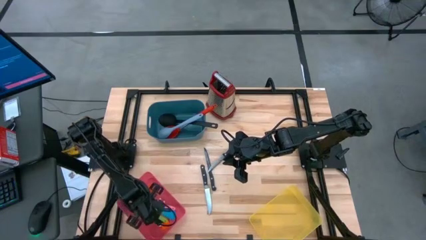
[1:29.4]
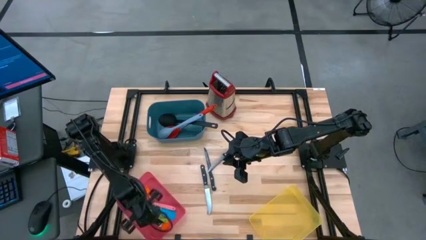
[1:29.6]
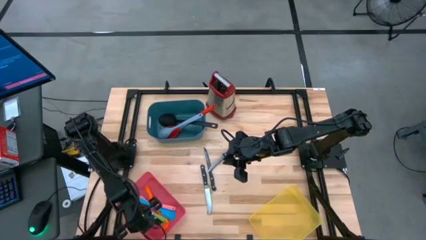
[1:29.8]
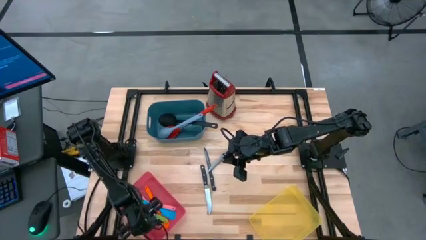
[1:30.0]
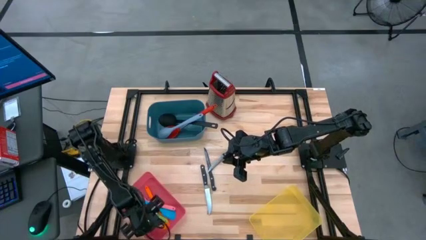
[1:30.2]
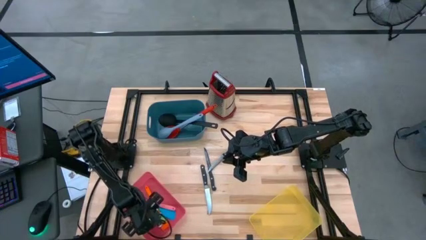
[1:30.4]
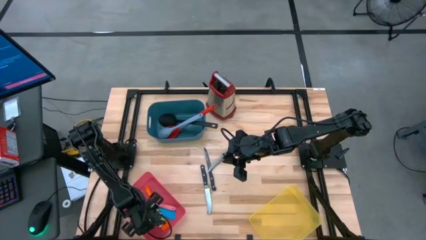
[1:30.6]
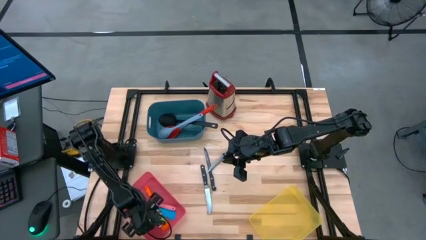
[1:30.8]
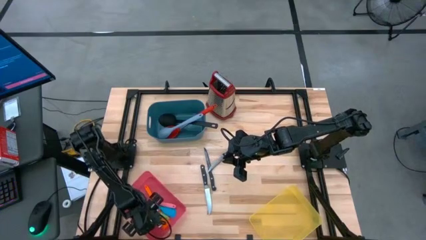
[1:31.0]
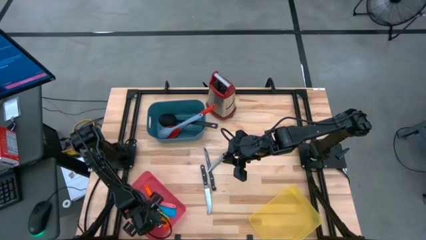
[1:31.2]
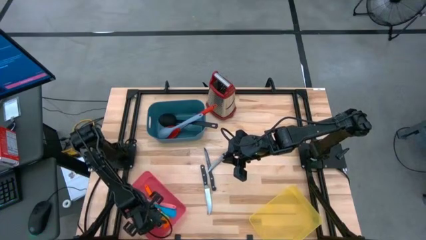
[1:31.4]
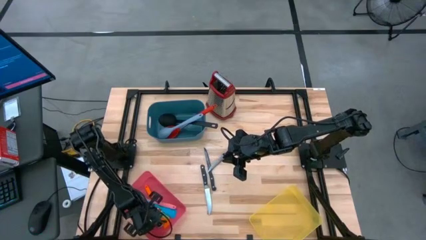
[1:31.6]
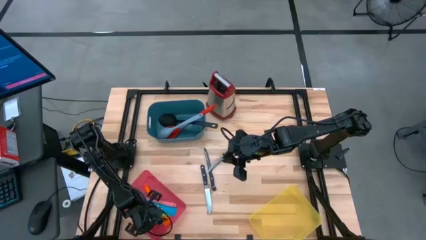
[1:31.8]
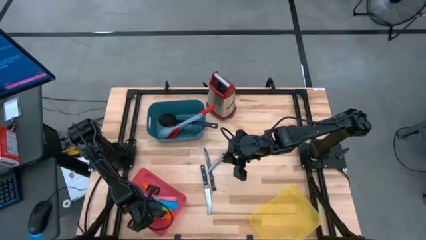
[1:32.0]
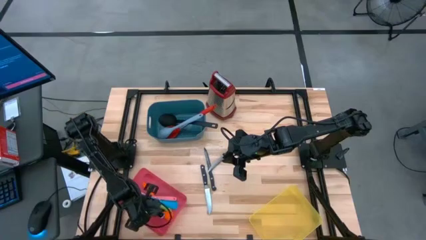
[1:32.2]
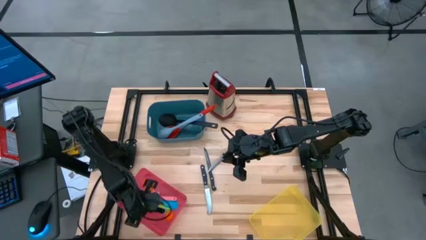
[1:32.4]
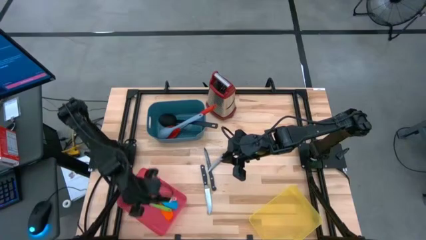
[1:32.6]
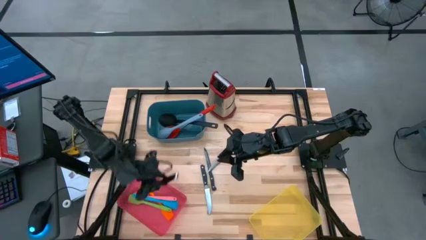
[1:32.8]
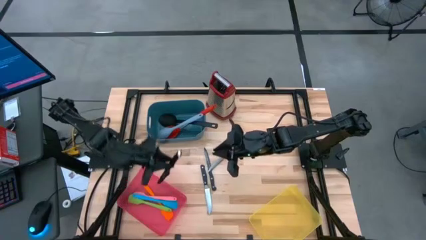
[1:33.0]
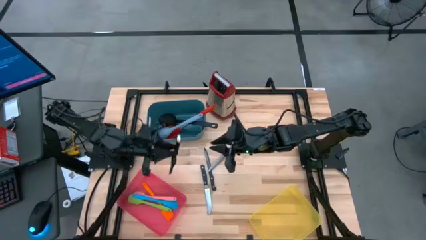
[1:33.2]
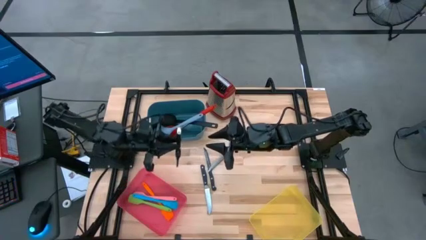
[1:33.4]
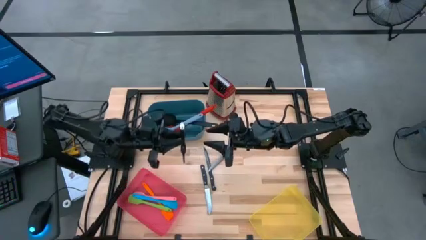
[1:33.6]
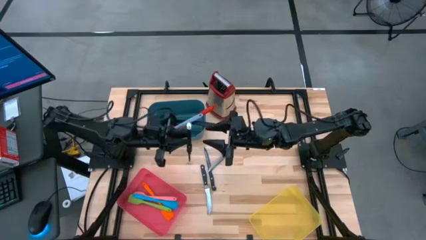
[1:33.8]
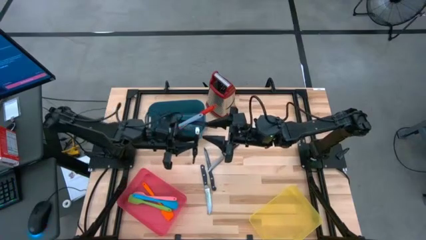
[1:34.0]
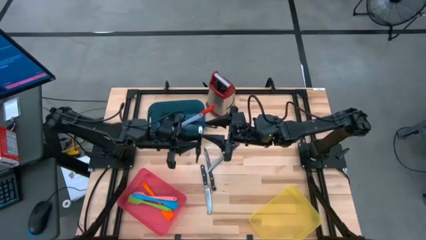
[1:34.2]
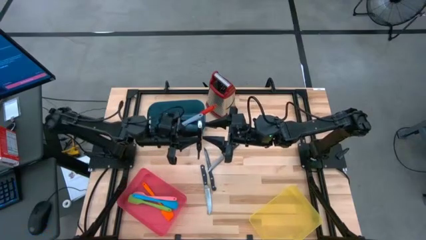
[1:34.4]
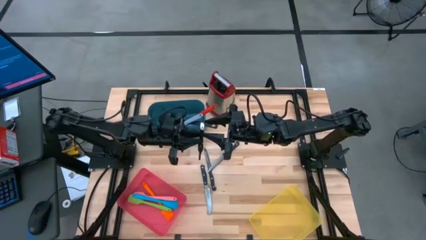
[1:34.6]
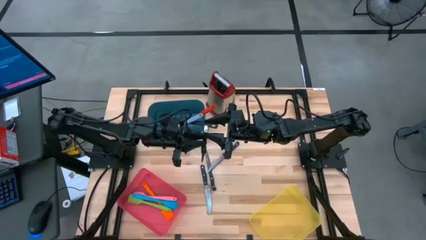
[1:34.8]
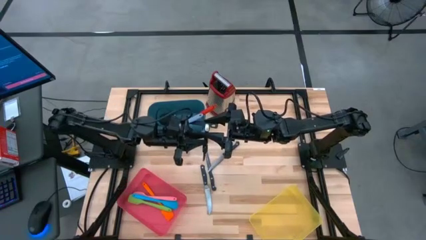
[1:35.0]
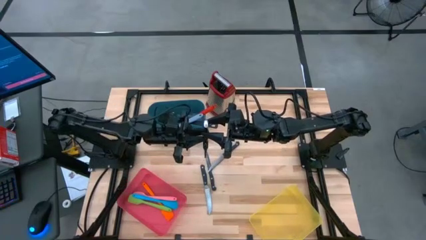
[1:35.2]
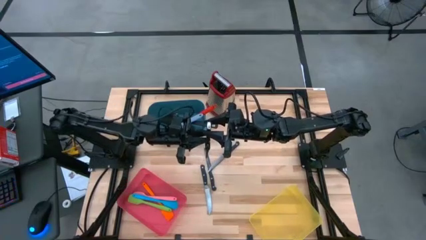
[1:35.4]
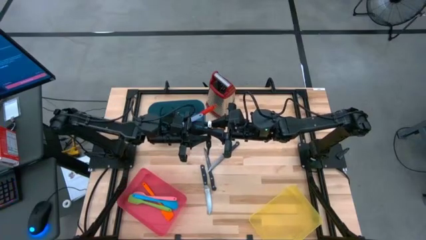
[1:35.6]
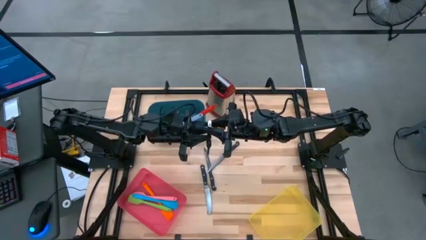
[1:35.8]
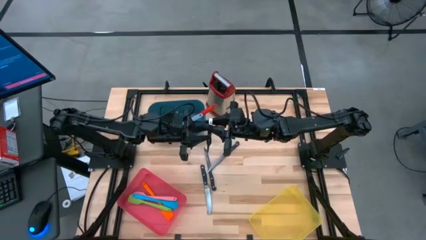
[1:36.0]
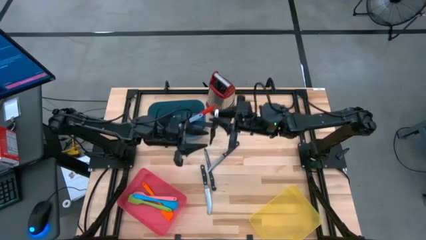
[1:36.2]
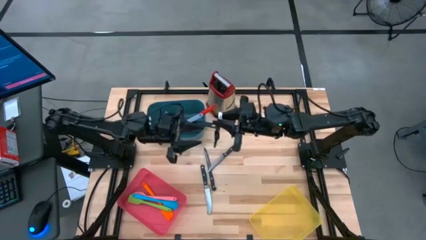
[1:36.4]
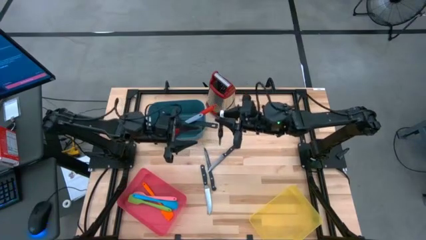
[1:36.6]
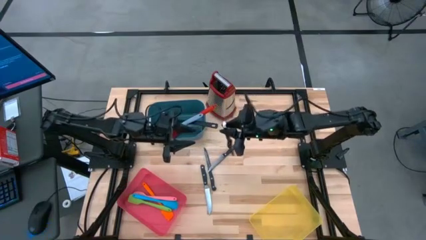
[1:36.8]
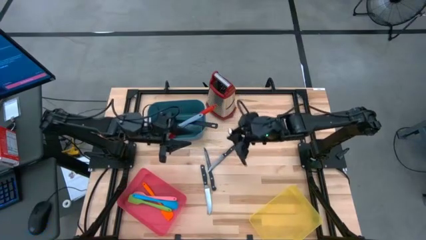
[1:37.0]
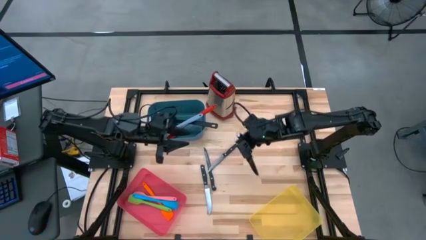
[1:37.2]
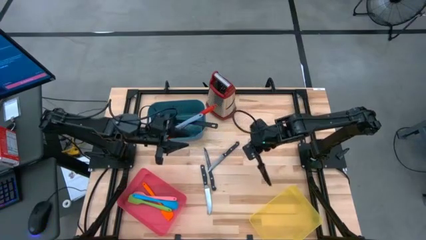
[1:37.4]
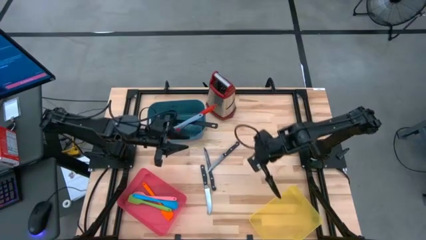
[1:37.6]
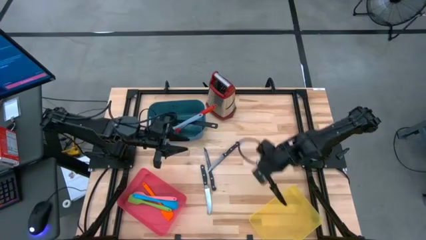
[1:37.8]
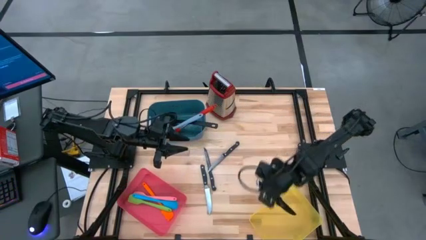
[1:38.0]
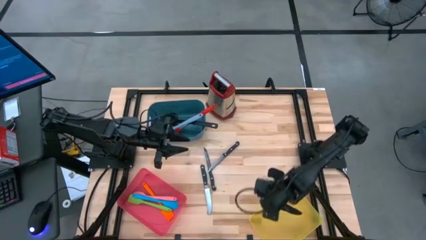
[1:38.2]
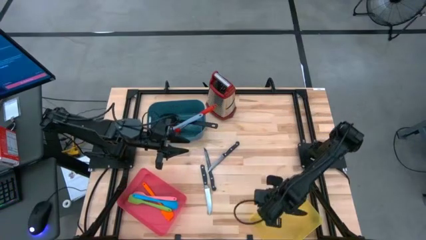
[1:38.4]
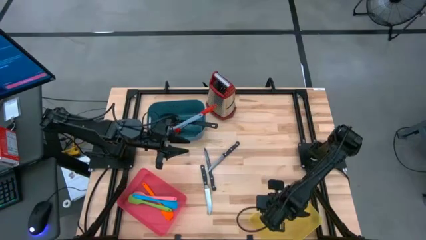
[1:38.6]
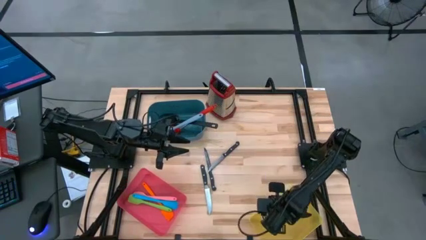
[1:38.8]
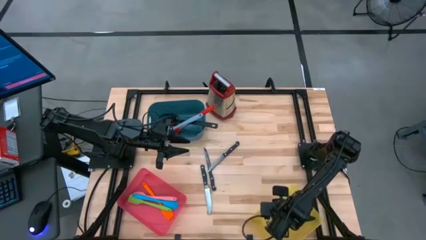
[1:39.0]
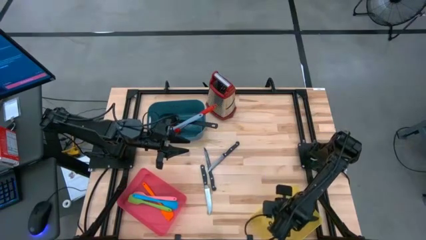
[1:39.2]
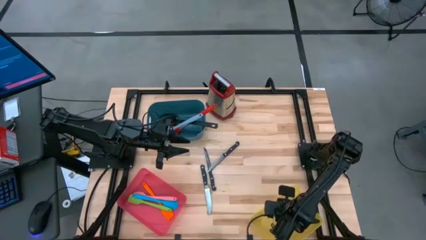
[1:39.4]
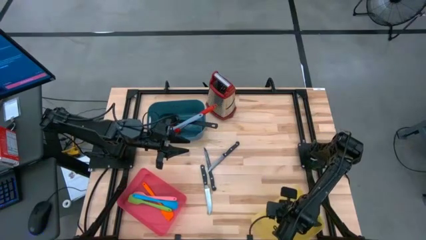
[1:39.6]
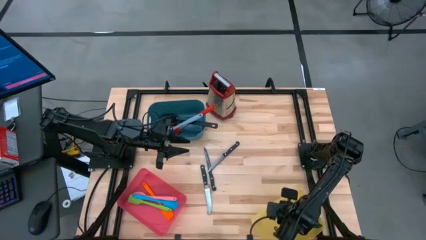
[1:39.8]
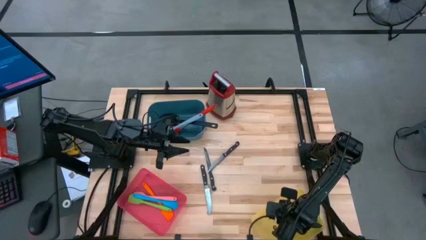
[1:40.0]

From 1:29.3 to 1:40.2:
Task: Pick & Place Kitchen Items
Put the black table knife into the yellow bin

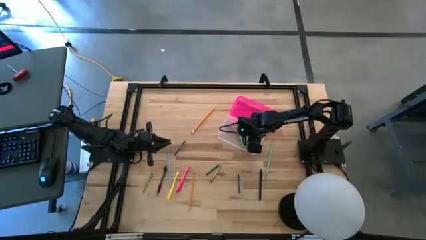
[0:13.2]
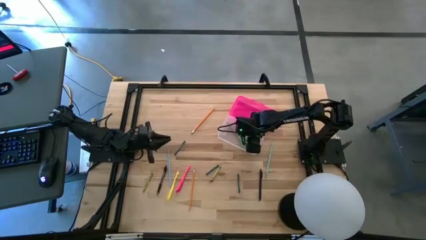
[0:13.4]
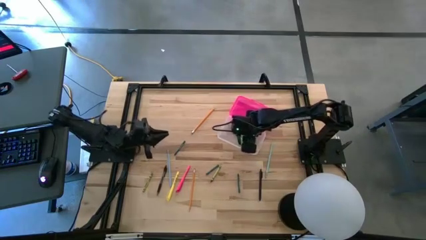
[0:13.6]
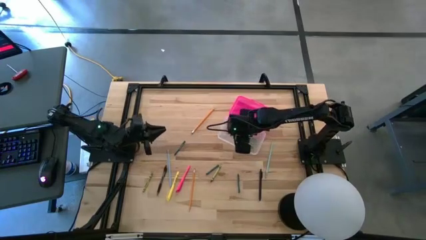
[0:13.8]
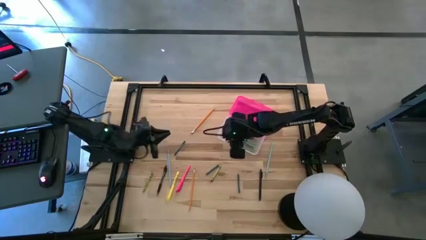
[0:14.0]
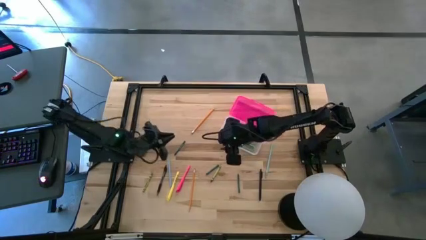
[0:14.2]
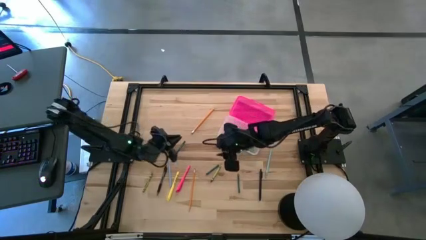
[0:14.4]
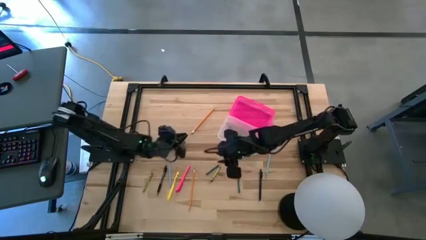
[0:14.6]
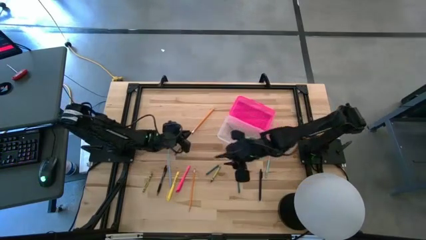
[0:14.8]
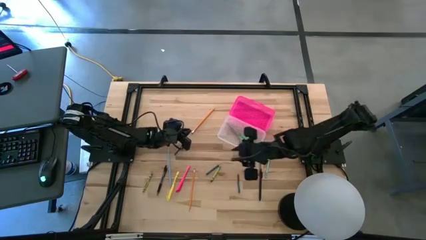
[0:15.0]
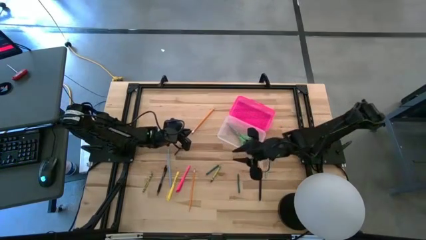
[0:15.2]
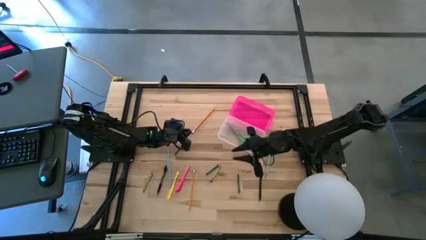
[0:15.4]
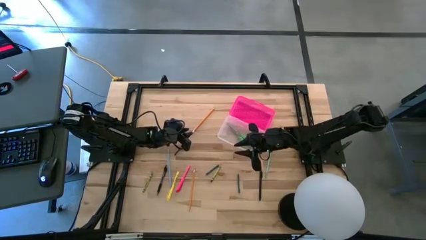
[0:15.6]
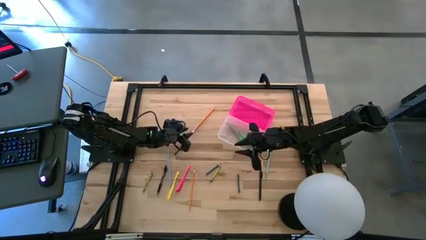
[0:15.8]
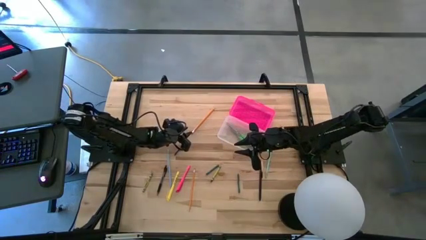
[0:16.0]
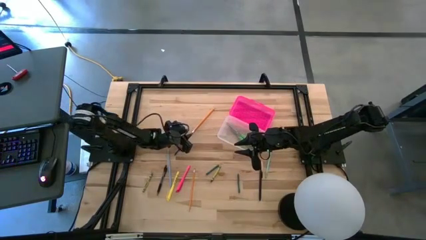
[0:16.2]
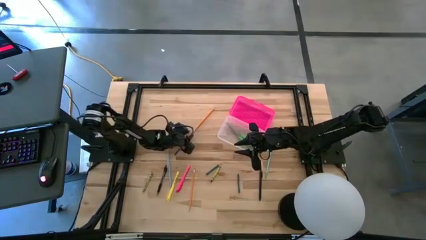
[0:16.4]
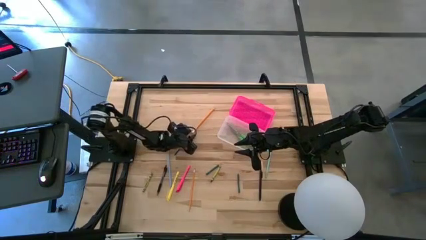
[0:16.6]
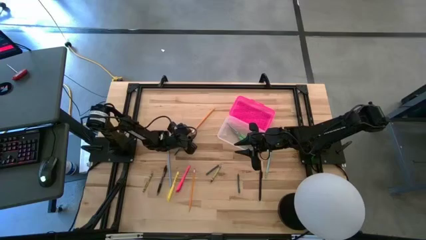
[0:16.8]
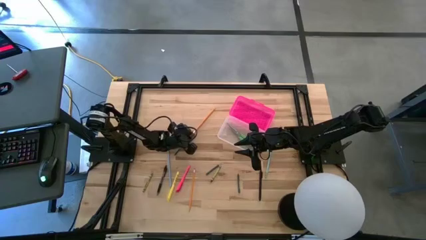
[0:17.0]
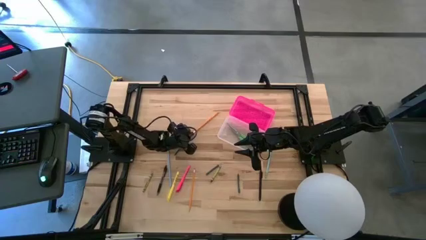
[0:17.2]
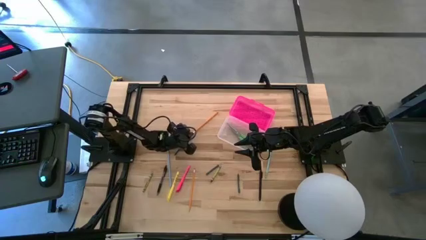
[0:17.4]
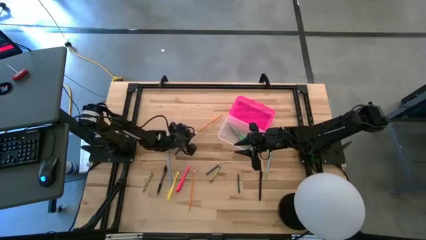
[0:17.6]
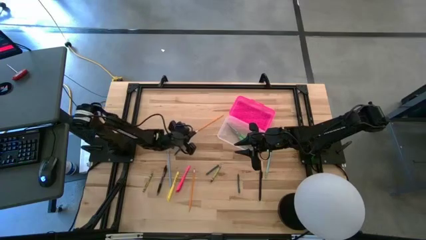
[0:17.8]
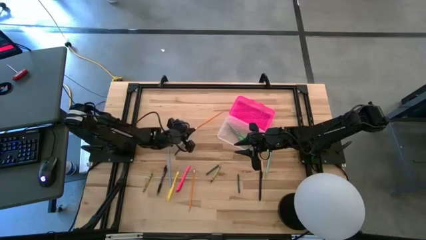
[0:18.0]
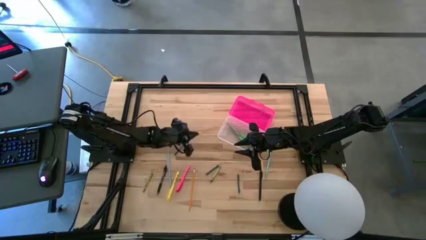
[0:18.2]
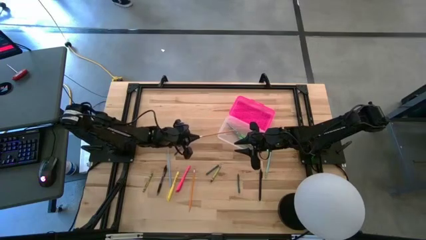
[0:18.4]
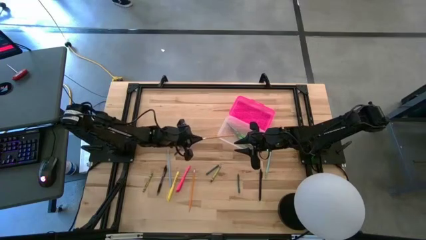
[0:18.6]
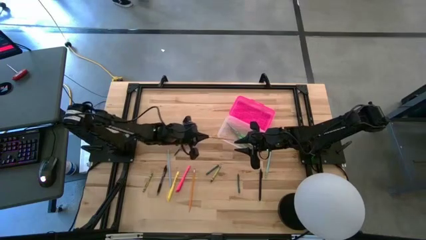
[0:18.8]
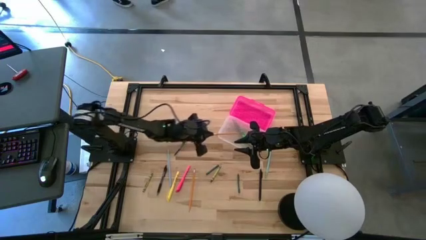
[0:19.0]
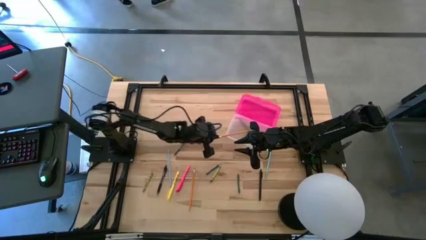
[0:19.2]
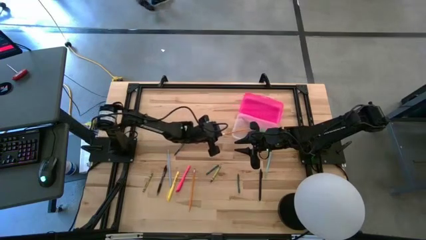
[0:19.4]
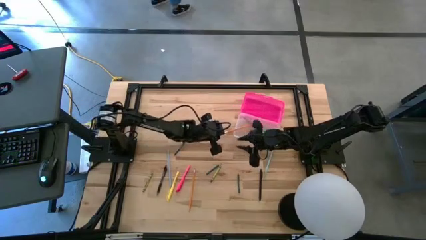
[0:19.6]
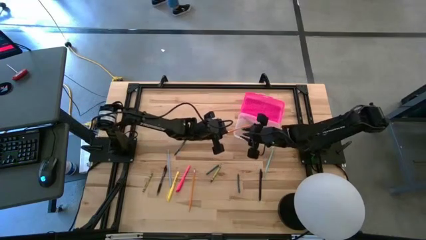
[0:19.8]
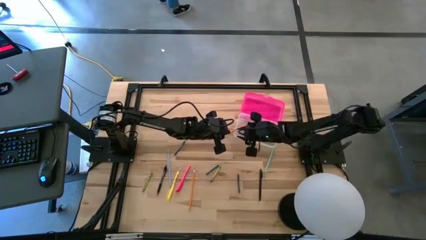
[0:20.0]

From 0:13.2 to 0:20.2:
Task: Pick & place school supplies into a supply box
Put the top orange pencil into the pink supply box
